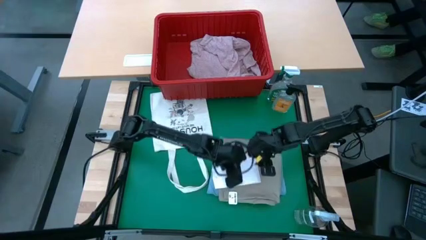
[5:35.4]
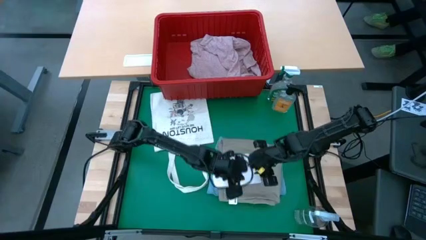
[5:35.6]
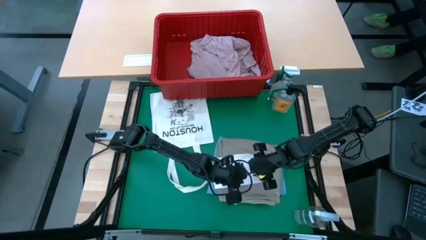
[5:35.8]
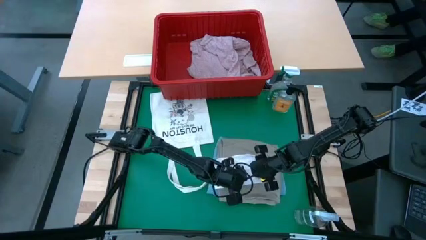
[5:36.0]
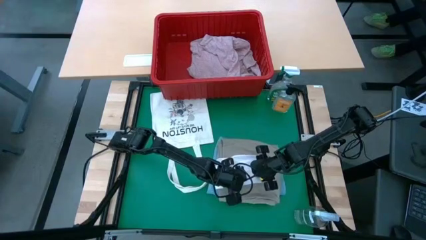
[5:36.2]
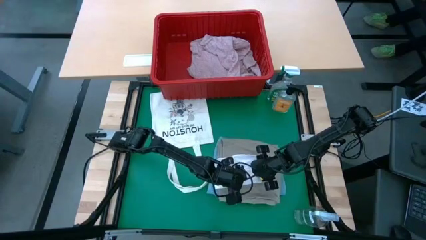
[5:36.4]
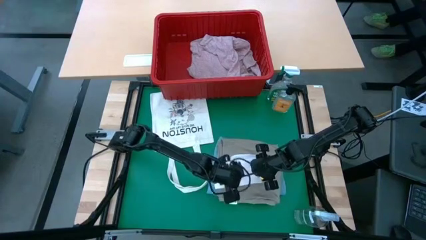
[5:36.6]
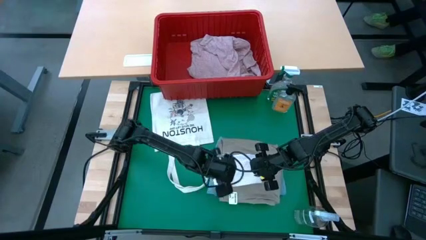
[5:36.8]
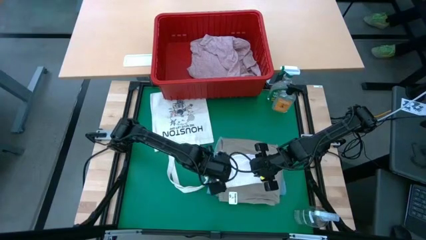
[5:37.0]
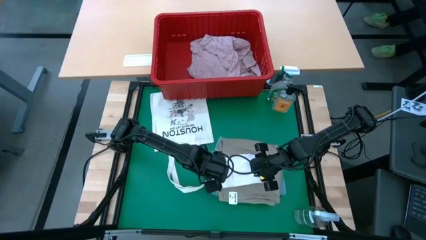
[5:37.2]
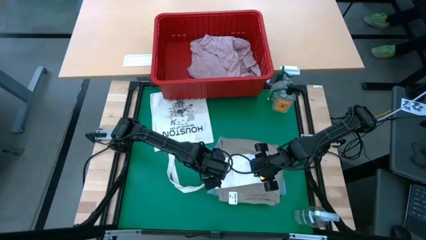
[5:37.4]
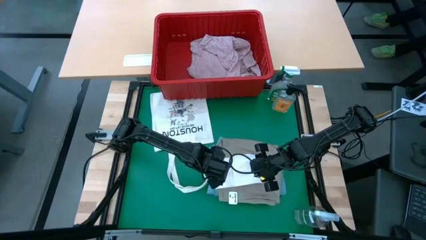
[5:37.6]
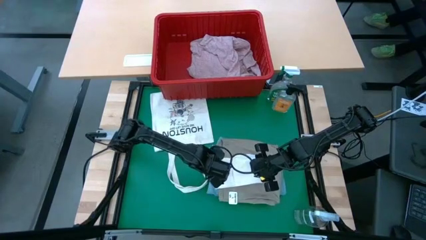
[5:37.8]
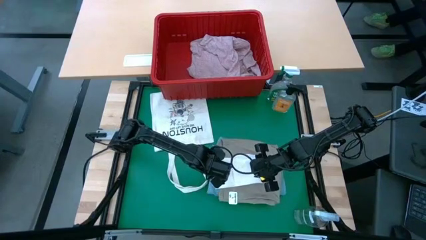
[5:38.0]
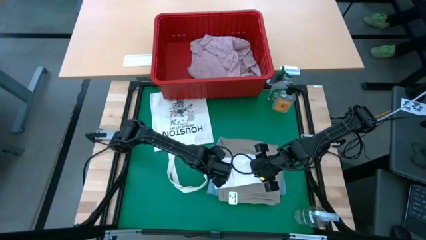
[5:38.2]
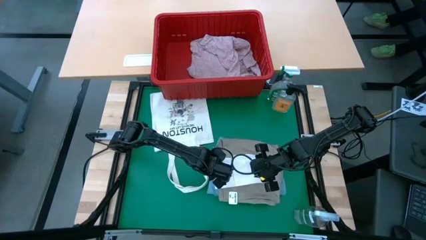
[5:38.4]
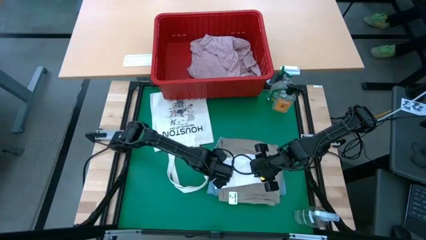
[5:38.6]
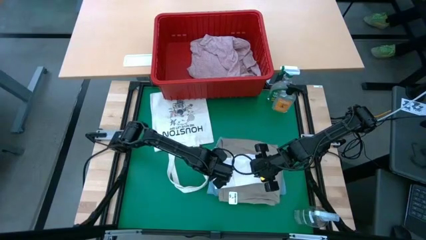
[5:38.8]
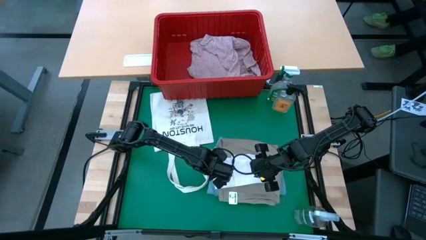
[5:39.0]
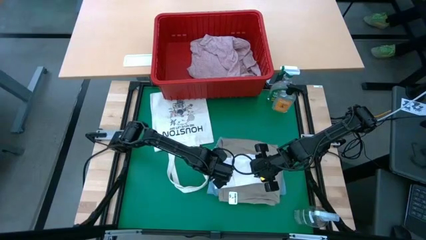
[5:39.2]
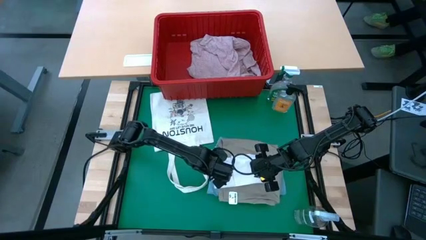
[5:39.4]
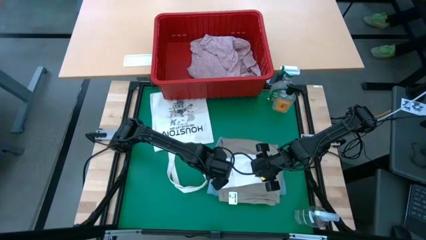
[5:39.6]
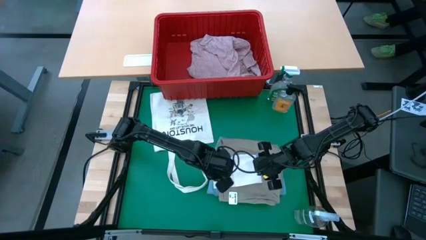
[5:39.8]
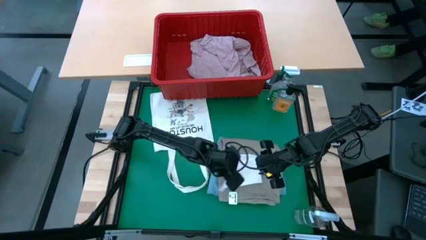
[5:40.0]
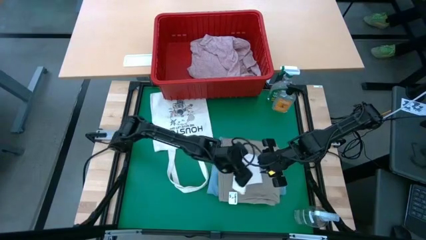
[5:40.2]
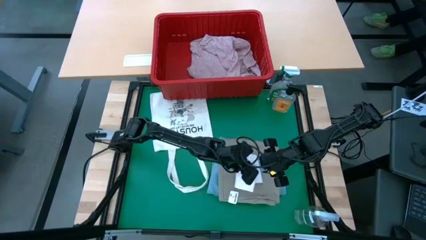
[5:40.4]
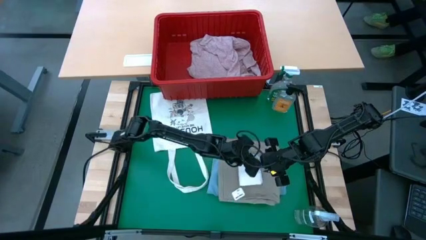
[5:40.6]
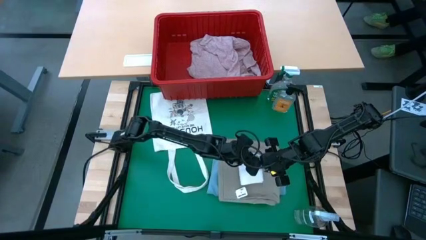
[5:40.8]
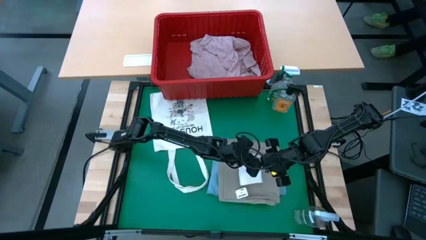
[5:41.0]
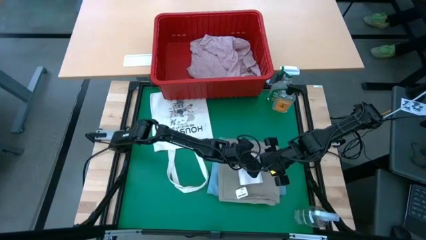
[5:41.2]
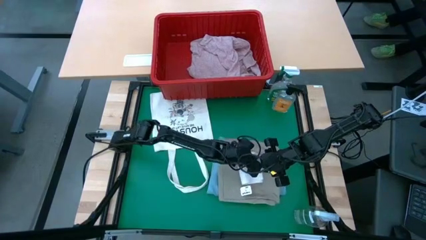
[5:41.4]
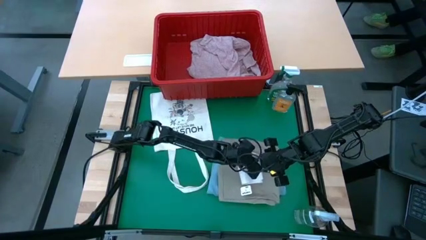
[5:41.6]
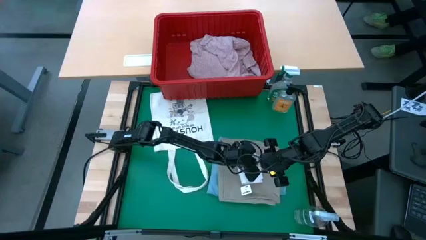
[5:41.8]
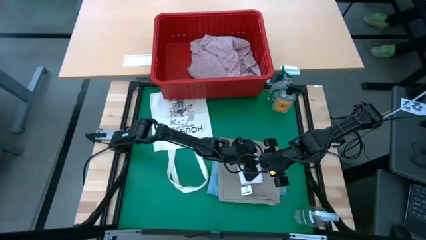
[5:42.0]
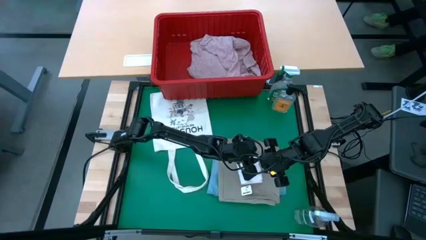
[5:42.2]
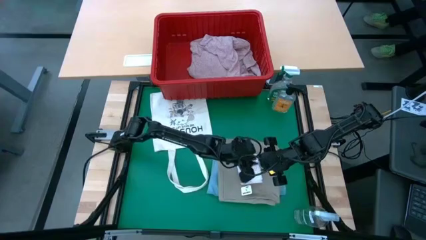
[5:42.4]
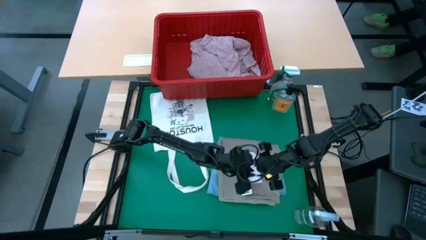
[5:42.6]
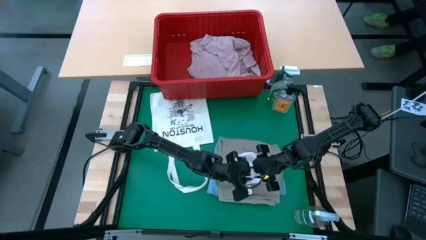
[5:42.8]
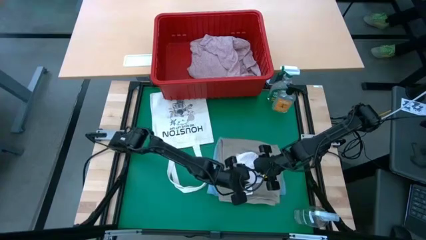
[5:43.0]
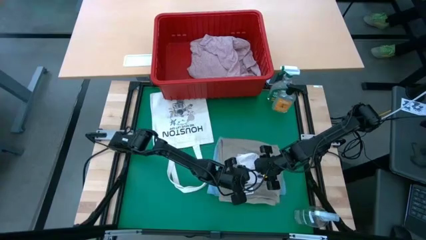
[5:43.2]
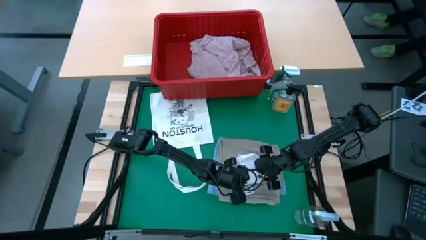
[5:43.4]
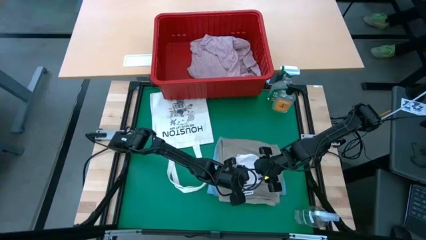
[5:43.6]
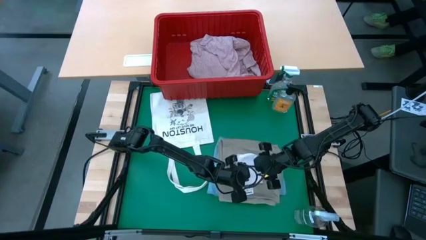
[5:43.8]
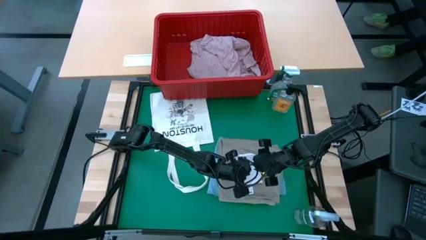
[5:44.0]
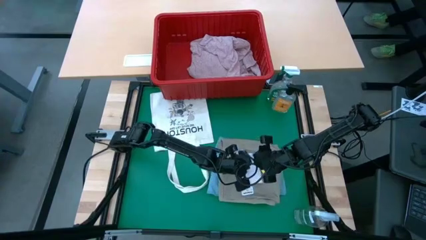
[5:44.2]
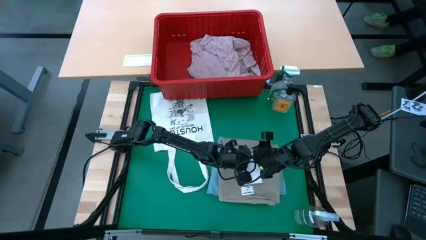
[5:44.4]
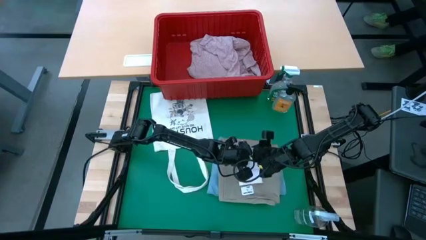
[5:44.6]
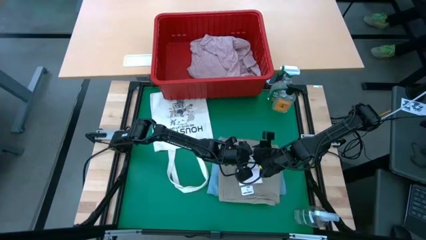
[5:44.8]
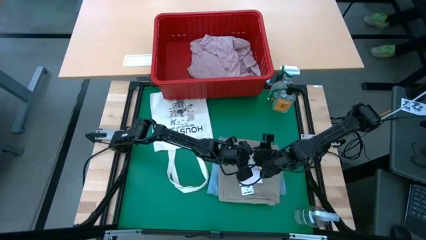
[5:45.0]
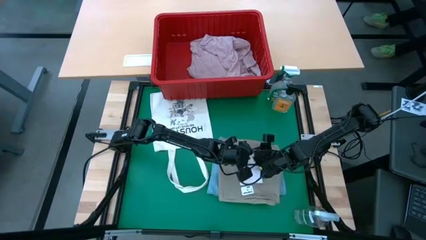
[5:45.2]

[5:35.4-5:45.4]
Task: Fold laundry
Fold the white underwear

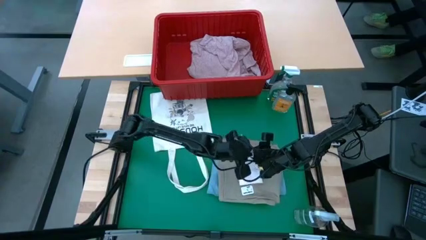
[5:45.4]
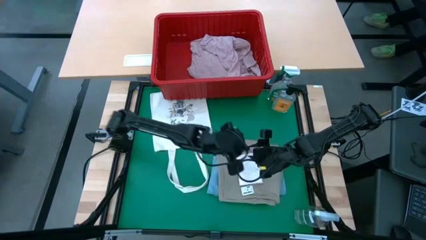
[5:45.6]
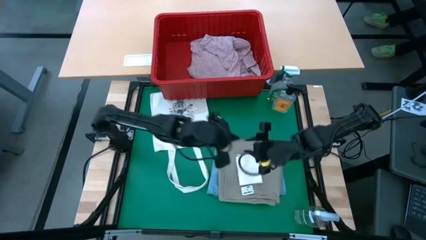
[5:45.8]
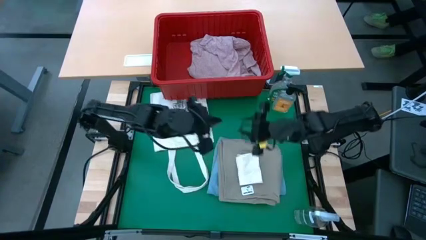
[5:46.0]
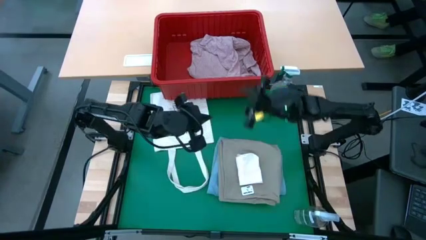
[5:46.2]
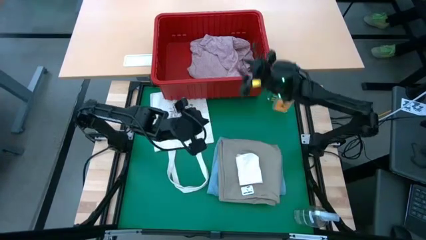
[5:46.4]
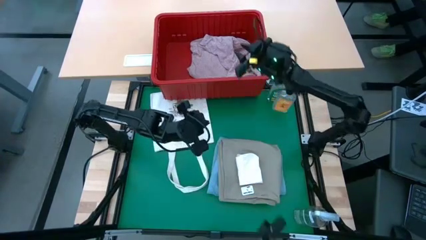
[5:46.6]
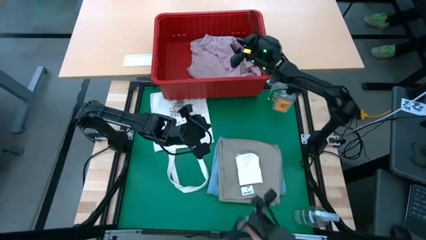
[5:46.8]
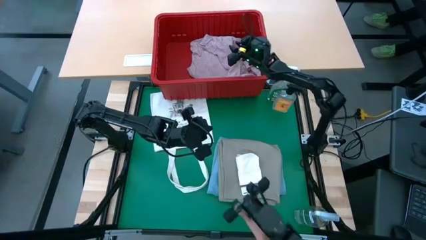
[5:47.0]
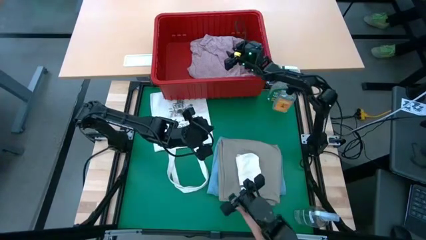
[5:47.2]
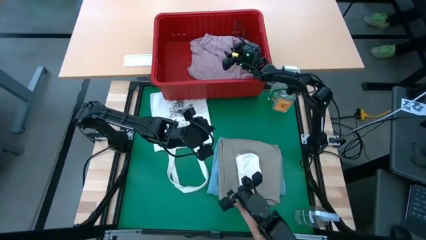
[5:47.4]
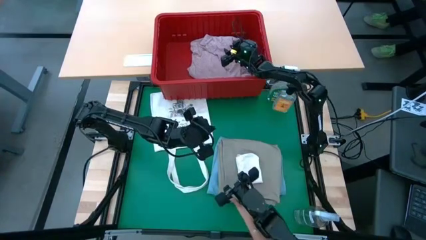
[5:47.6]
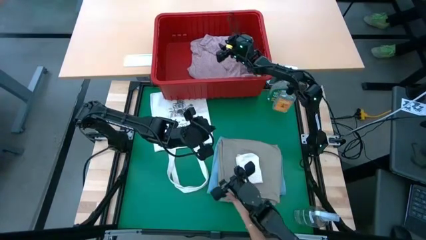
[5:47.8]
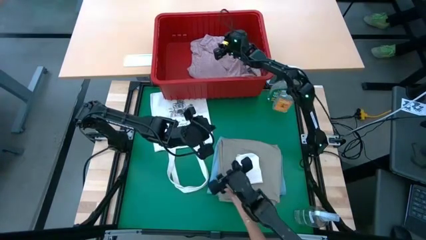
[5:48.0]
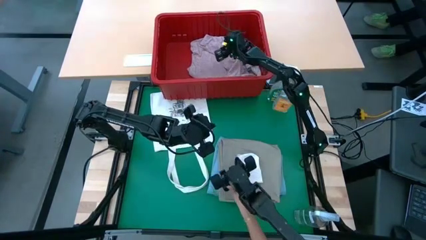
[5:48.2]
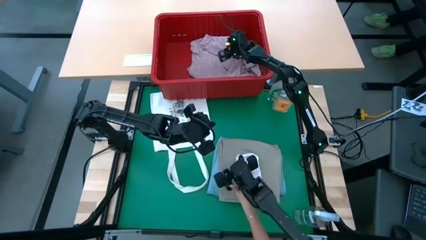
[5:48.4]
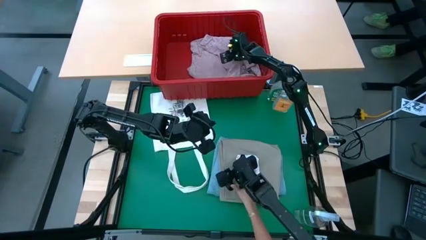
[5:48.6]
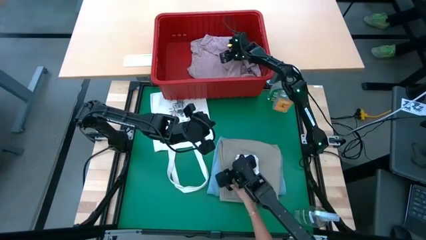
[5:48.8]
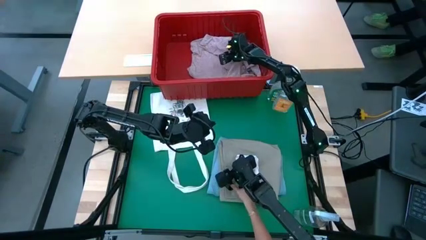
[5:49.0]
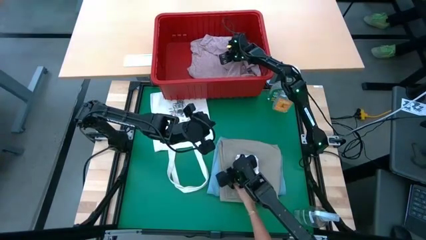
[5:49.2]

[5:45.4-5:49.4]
Remove the pink polo from the red bin

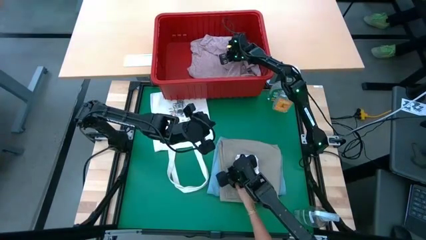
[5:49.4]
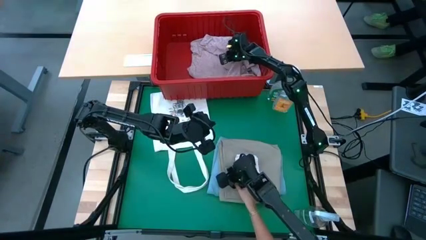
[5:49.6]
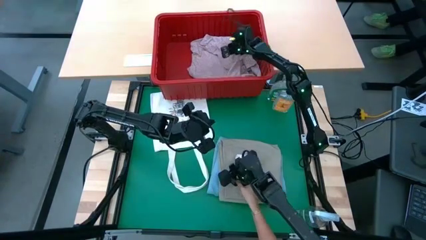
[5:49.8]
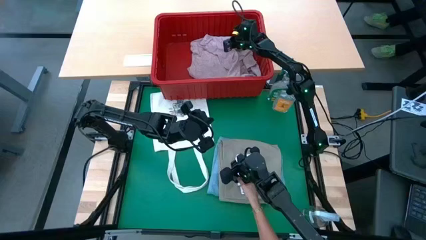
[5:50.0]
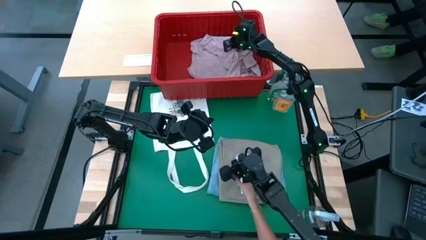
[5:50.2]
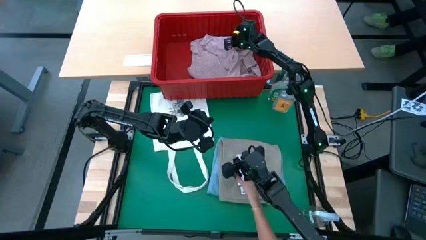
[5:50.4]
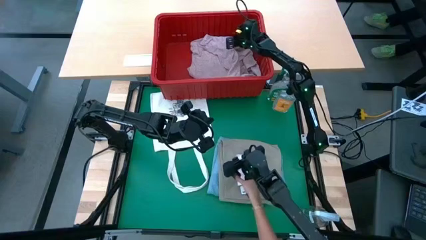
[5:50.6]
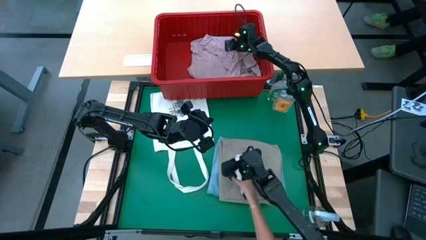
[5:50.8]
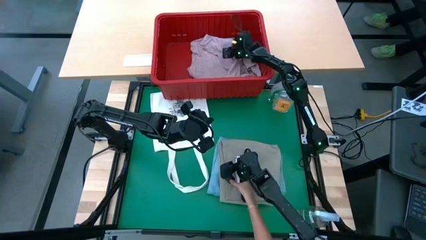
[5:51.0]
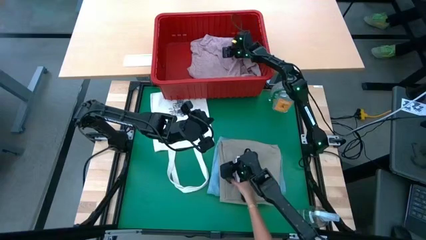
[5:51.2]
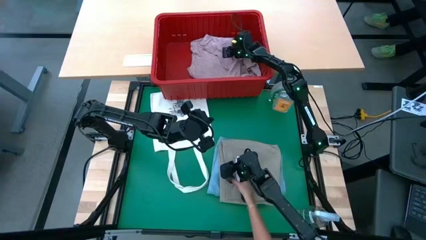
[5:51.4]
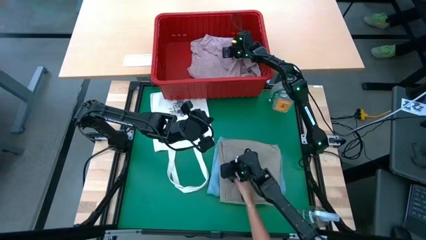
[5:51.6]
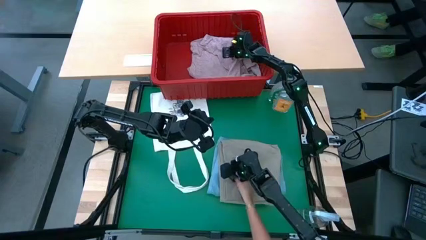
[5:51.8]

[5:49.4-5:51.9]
Remove the pink polo from the red bin
